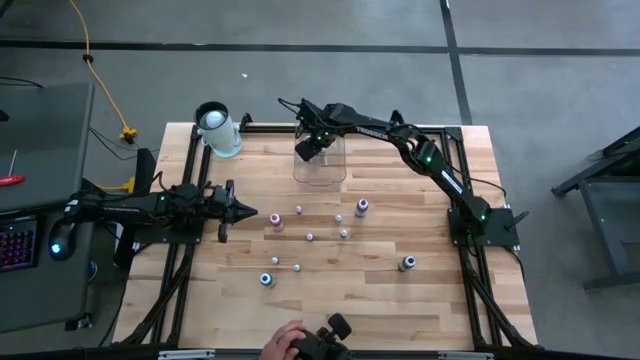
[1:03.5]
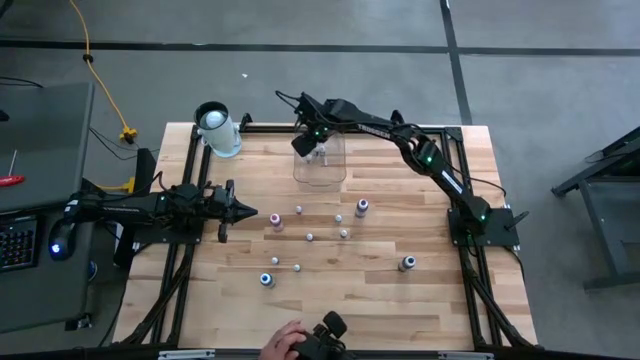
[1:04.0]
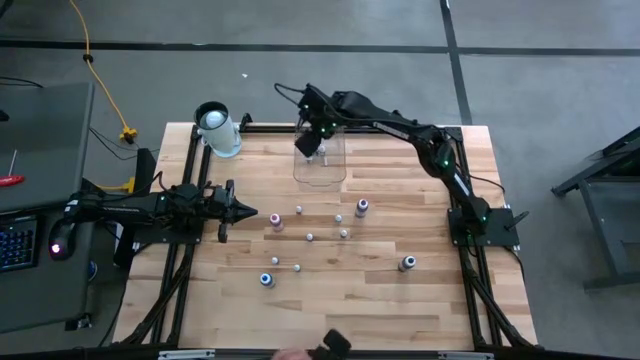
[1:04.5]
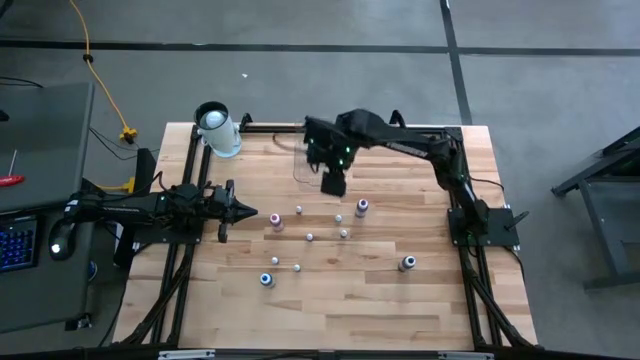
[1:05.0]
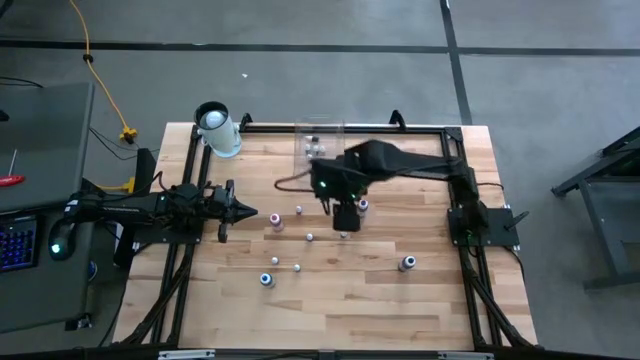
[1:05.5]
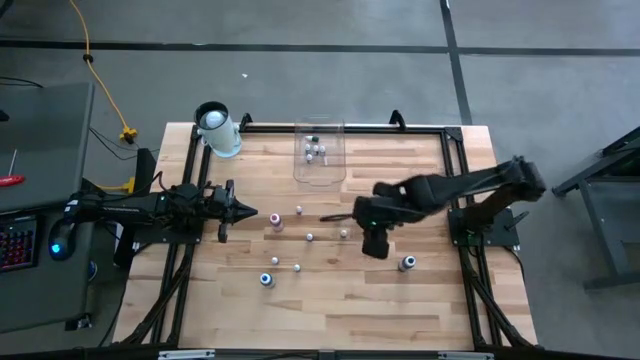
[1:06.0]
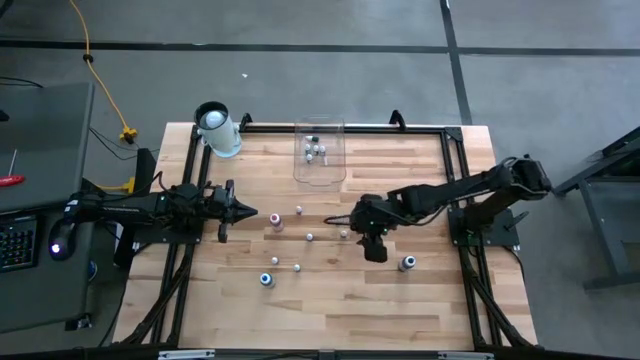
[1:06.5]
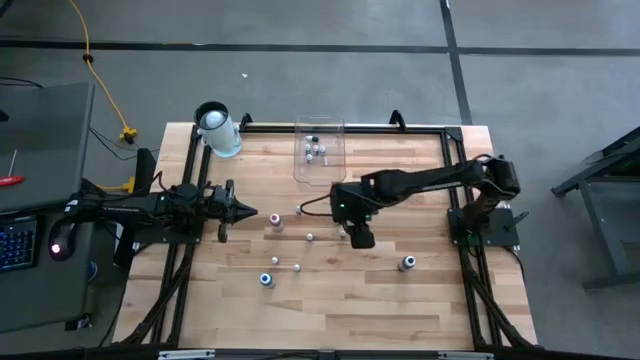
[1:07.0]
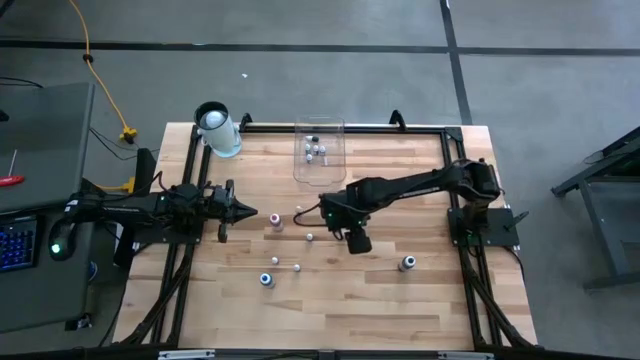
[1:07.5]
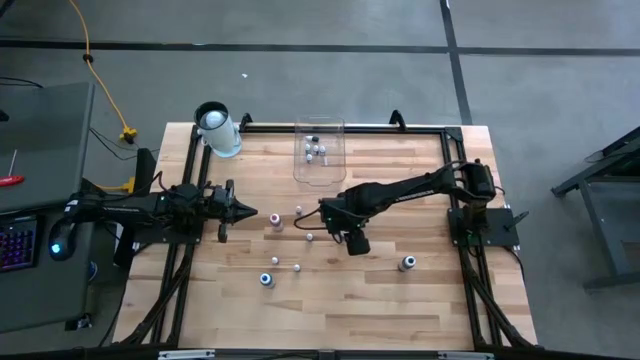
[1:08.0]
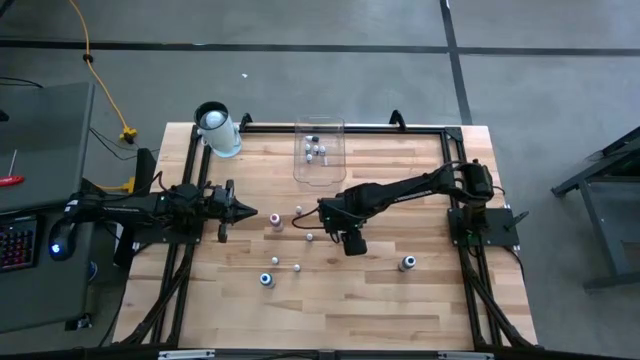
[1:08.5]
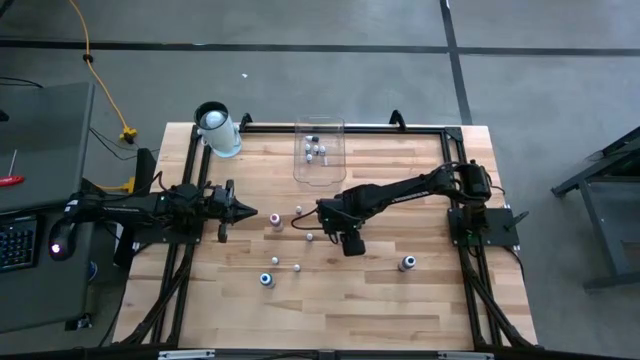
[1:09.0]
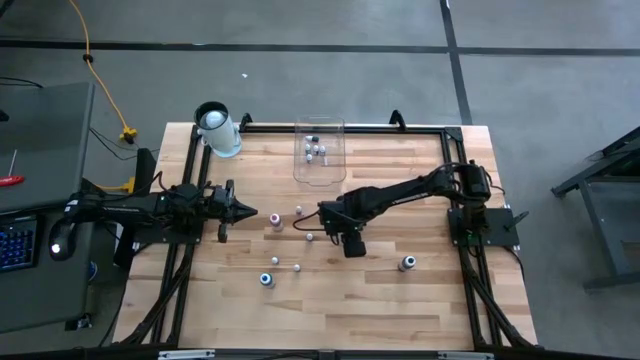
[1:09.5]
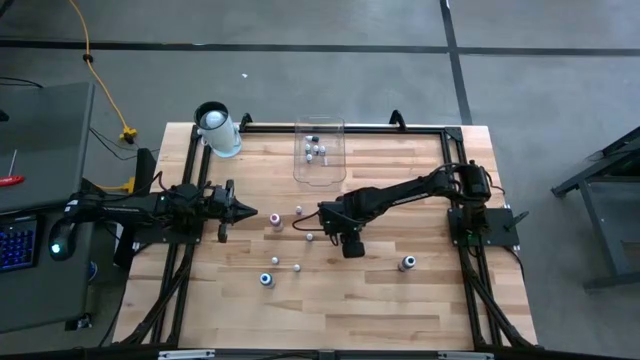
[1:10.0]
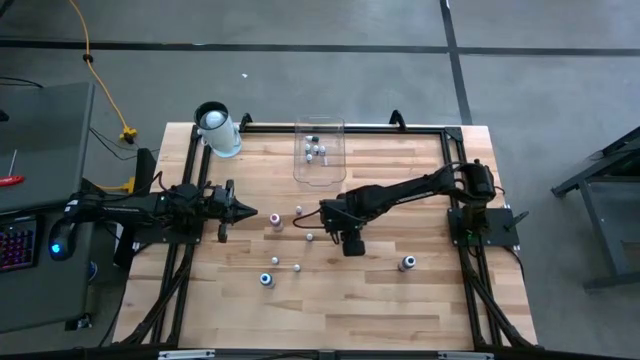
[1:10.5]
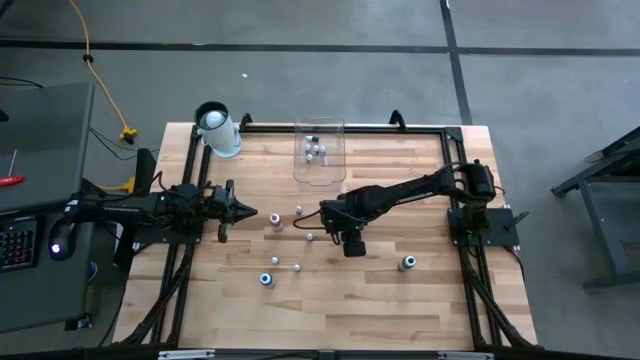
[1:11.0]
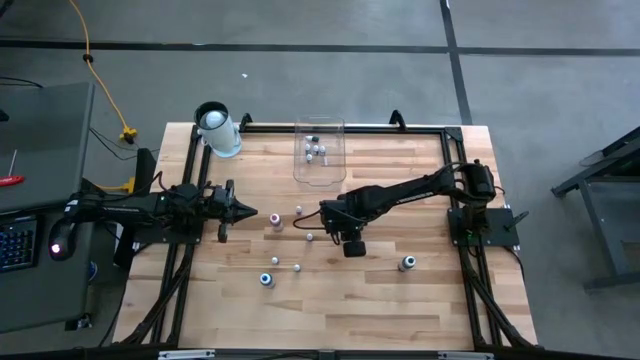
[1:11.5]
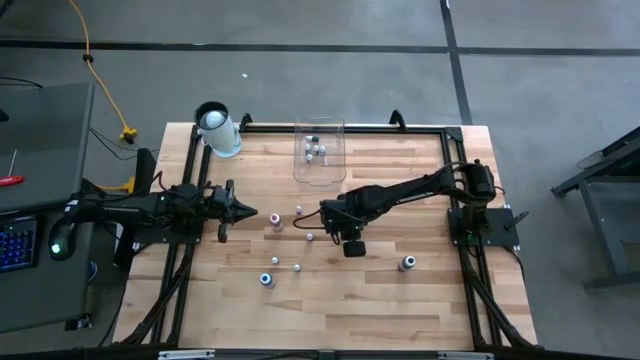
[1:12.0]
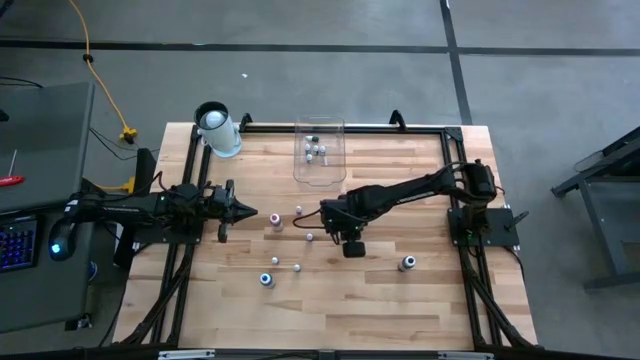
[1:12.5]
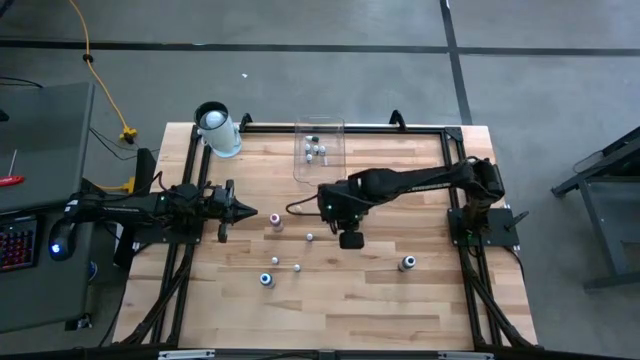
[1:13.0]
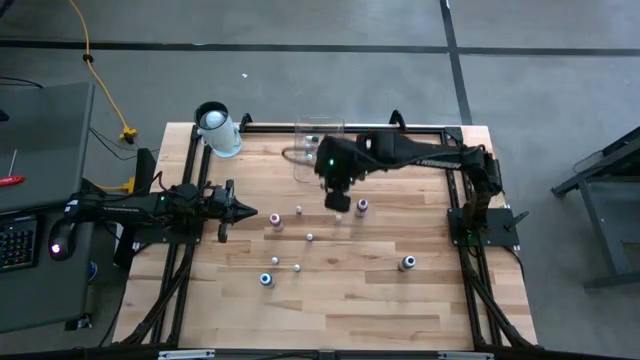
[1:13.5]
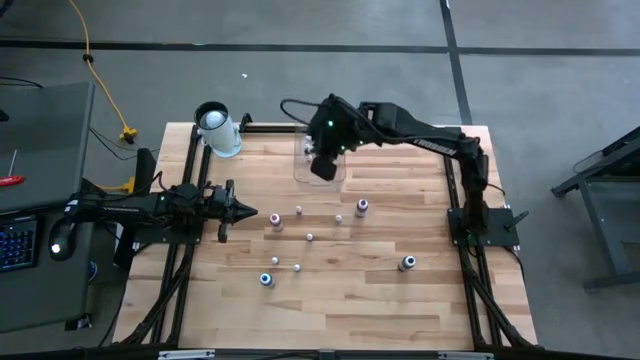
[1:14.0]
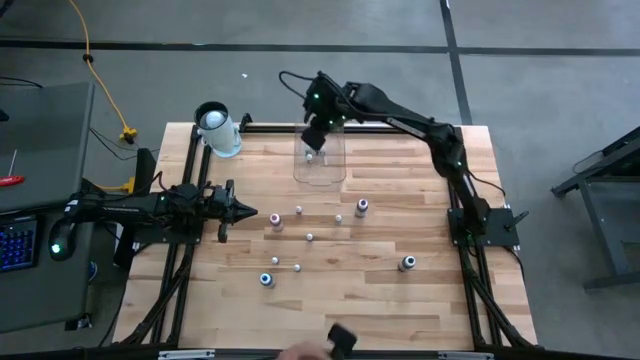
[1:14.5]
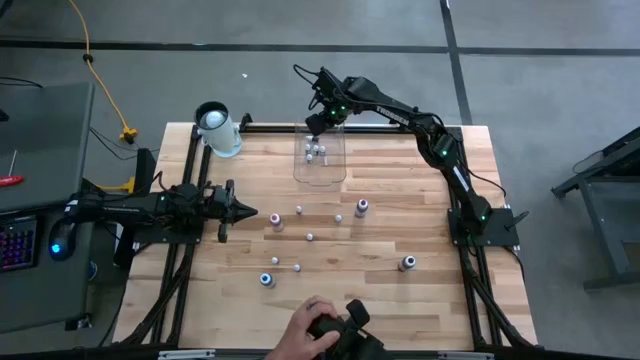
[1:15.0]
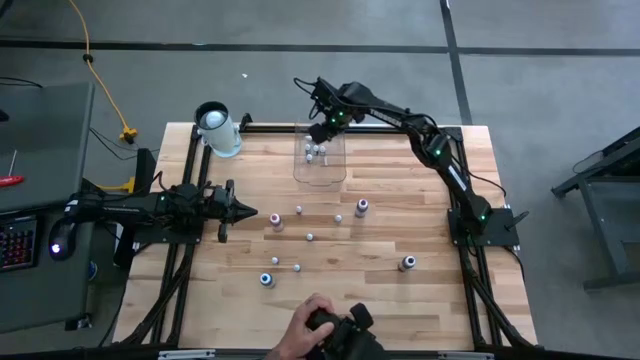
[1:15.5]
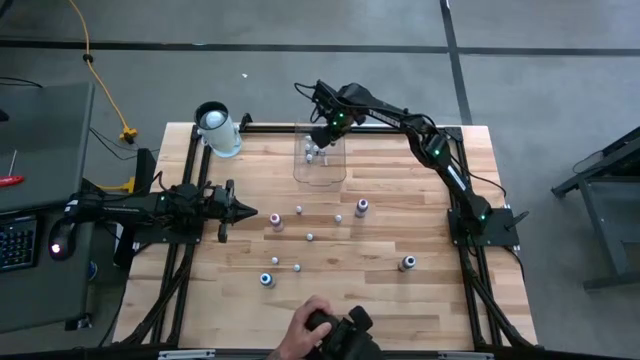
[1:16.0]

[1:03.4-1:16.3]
Task: Pick & Place food coloring
Put the small violet food coloring bottle into the container

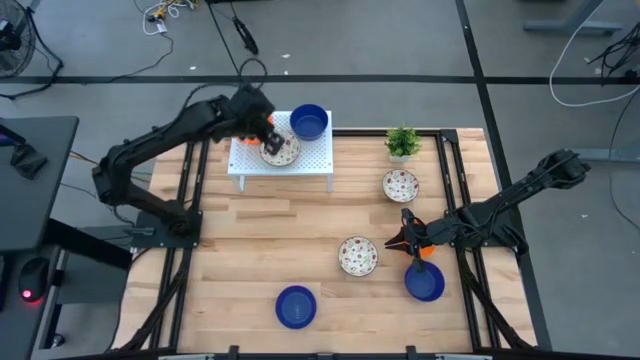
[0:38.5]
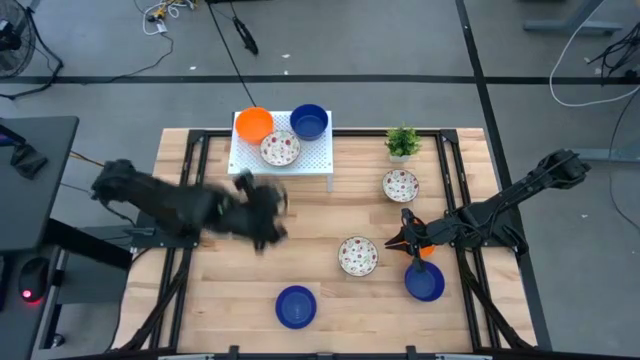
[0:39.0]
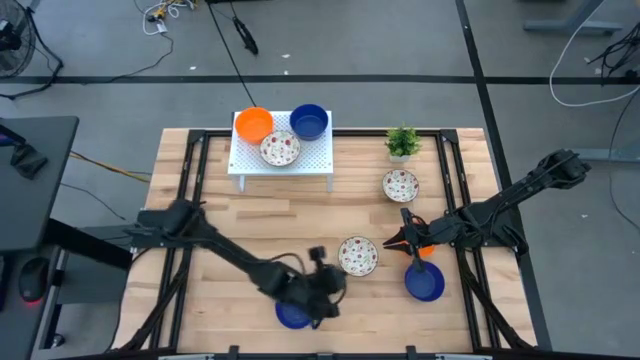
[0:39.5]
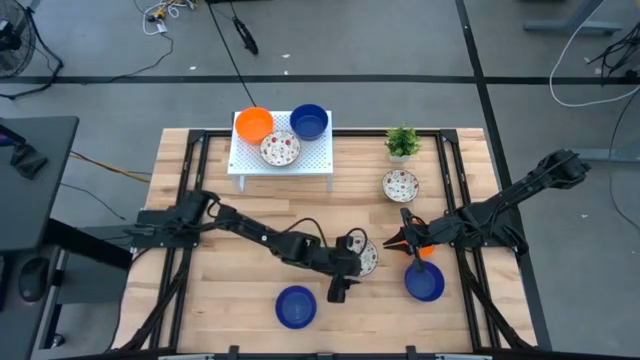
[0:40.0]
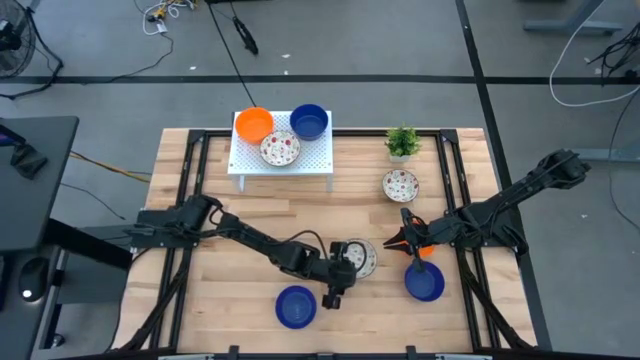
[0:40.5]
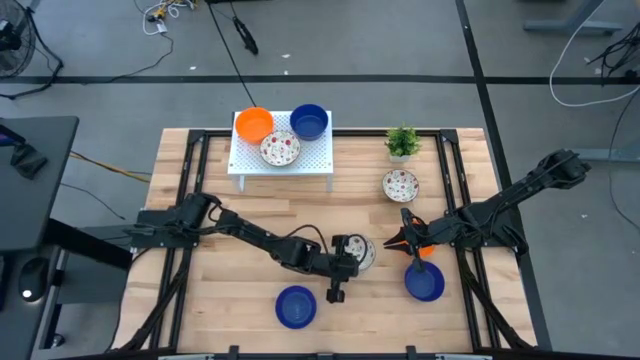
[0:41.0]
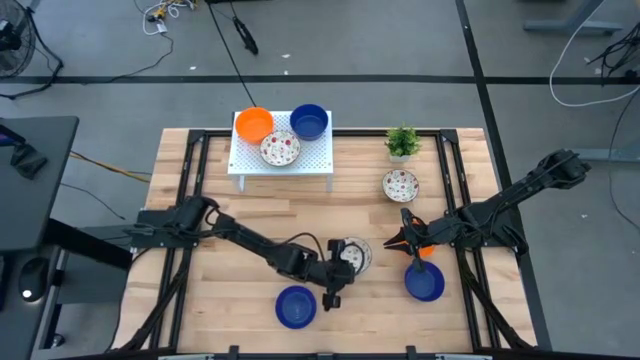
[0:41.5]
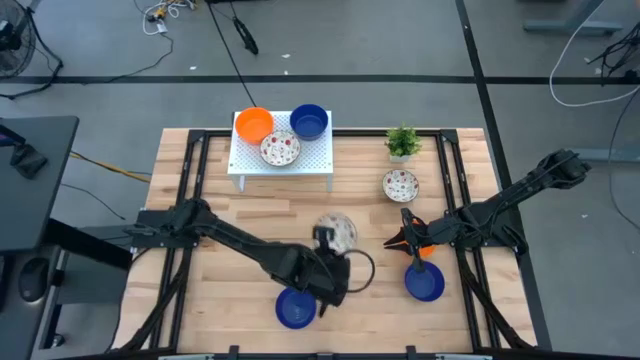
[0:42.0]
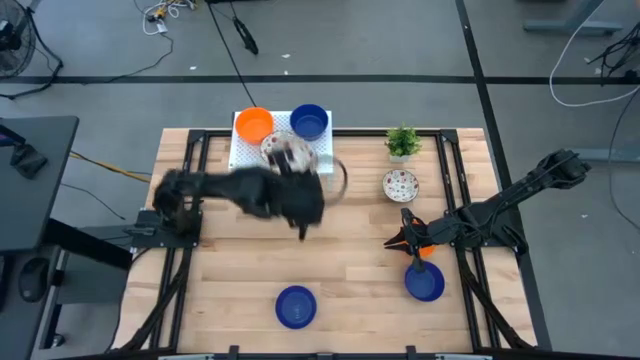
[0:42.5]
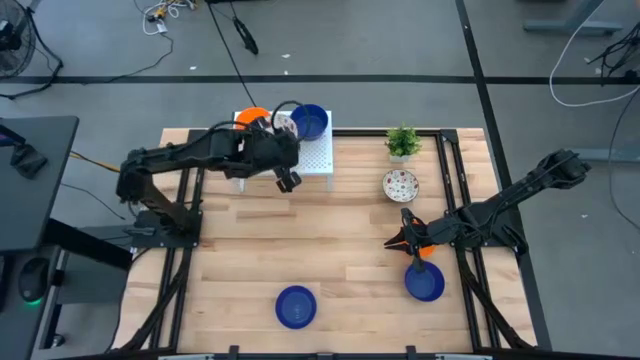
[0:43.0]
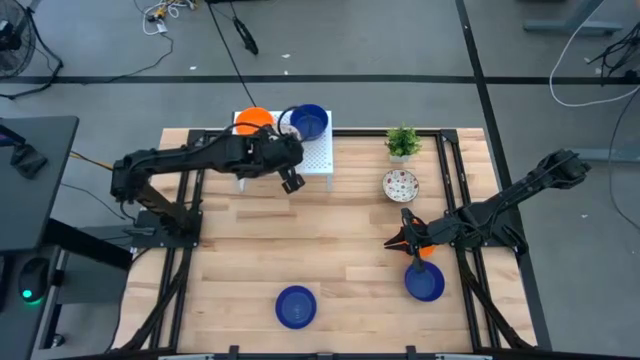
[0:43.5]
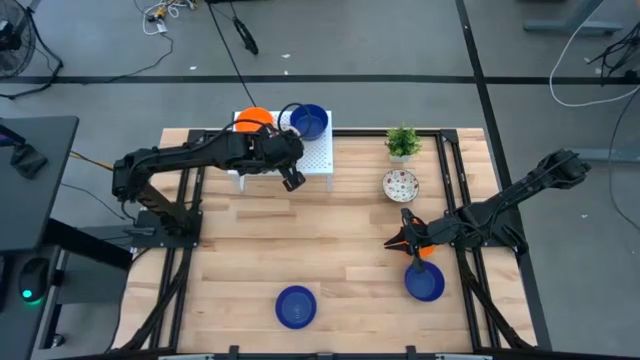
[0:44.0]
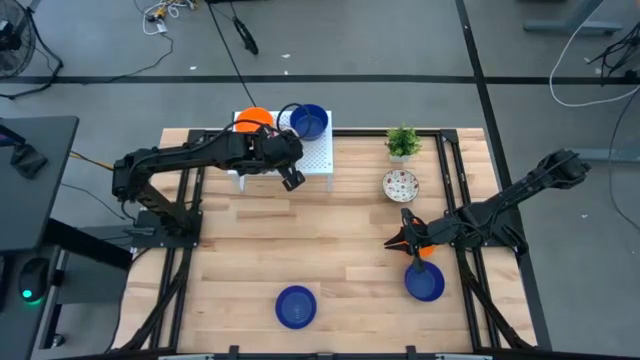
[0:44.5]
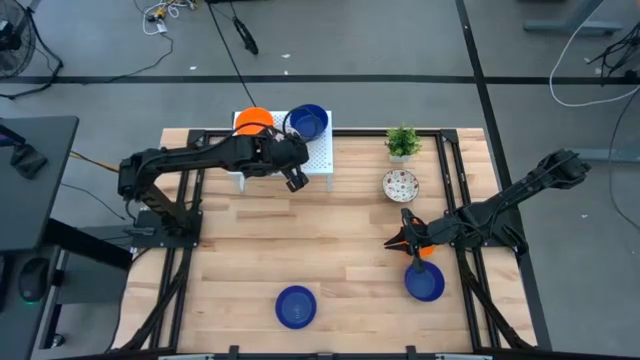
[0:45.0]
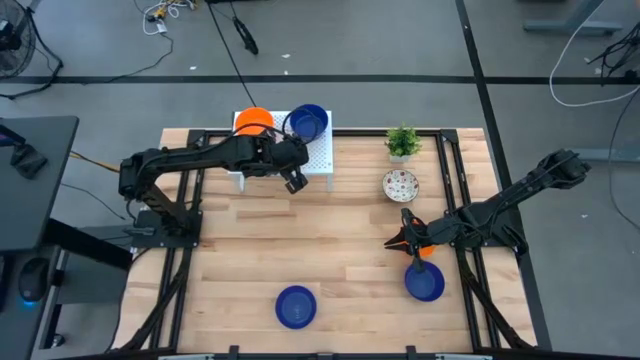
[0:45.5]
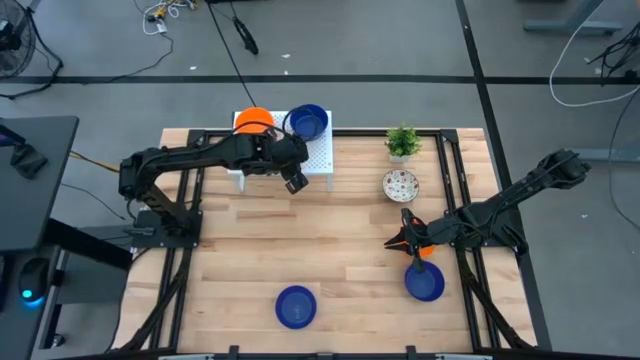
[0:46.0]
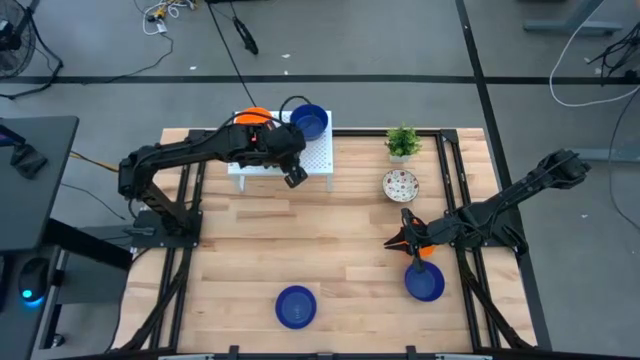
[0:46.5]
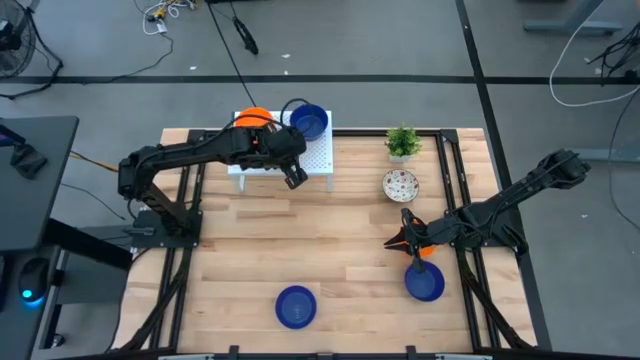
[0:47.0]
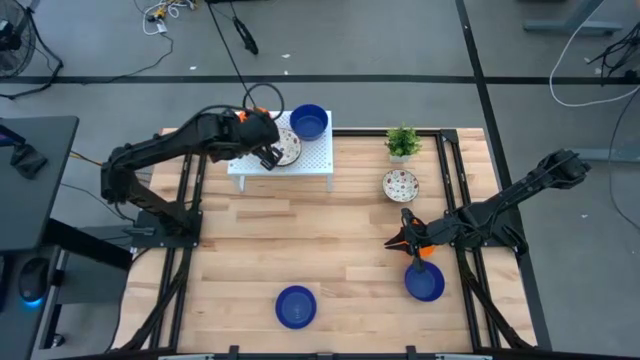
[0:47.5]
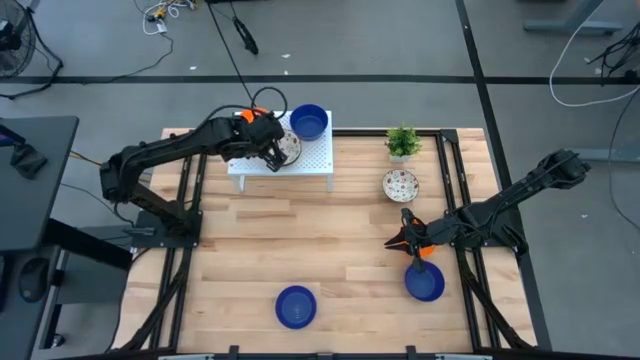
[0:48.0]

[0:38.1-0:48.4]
Task: Pick & Place Mini bowls
Stack the red pattern bowl on top of the red pattern bowl on the shelf
